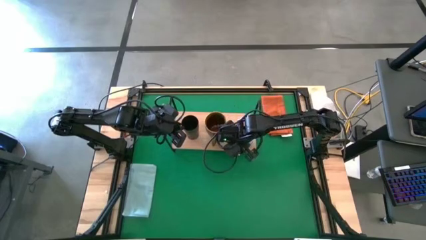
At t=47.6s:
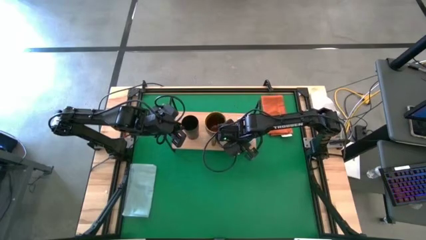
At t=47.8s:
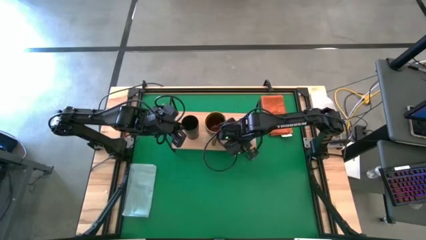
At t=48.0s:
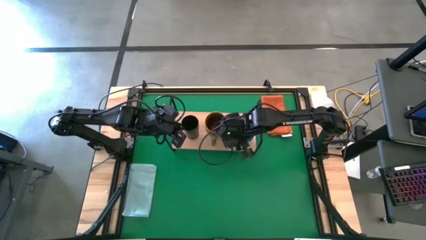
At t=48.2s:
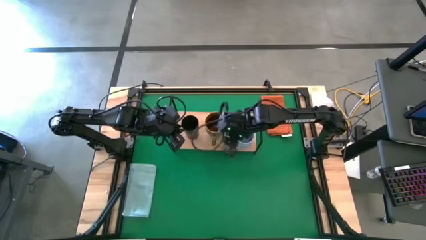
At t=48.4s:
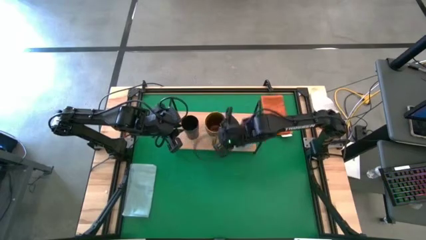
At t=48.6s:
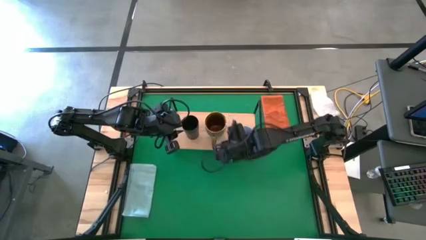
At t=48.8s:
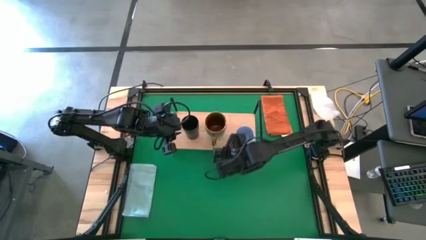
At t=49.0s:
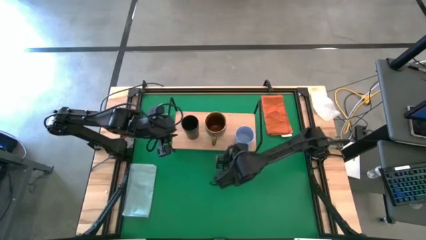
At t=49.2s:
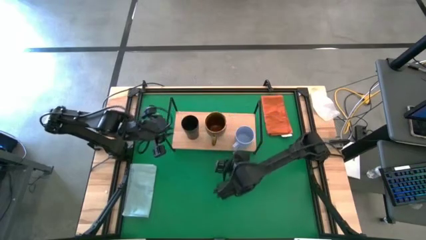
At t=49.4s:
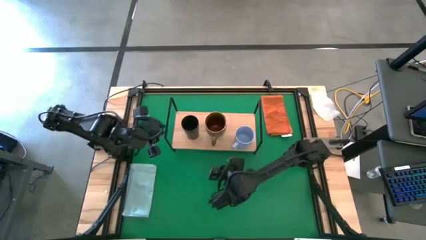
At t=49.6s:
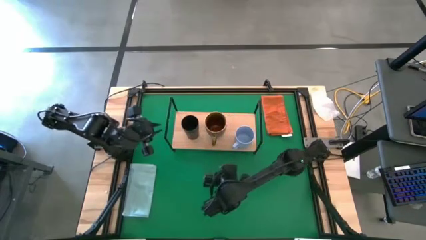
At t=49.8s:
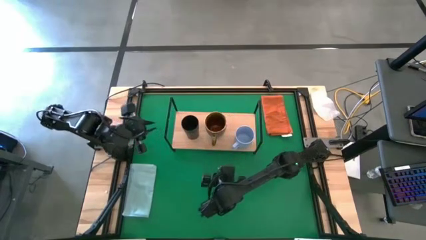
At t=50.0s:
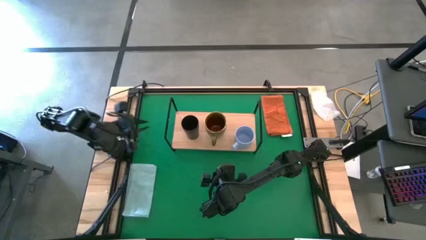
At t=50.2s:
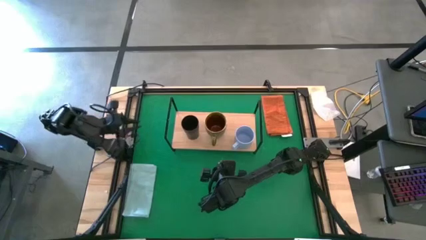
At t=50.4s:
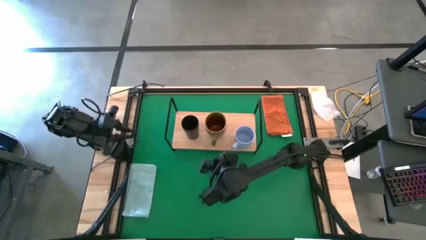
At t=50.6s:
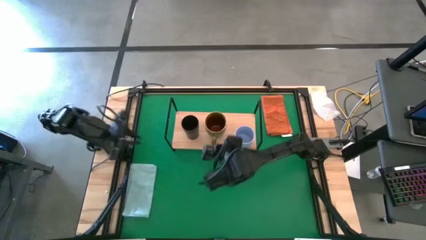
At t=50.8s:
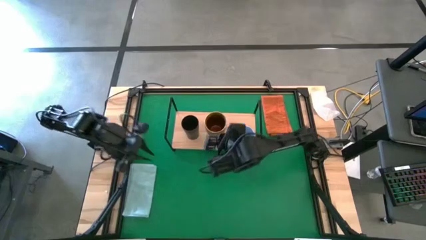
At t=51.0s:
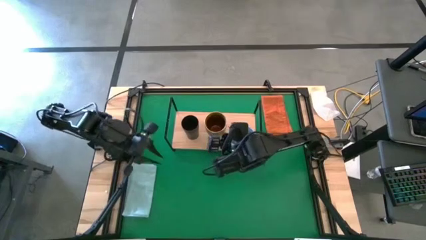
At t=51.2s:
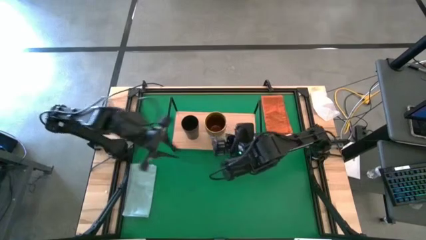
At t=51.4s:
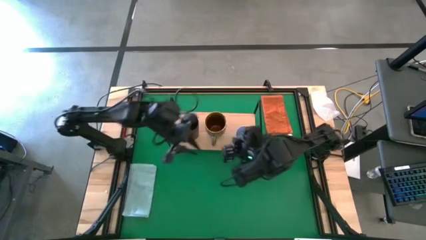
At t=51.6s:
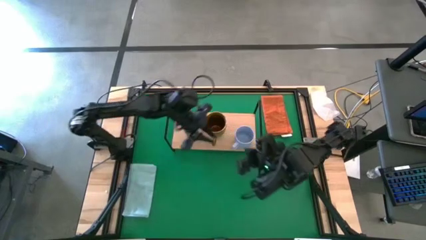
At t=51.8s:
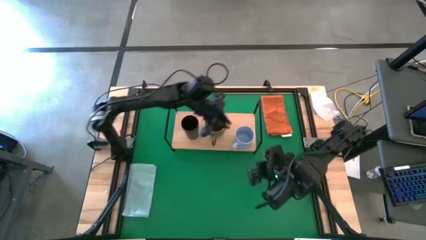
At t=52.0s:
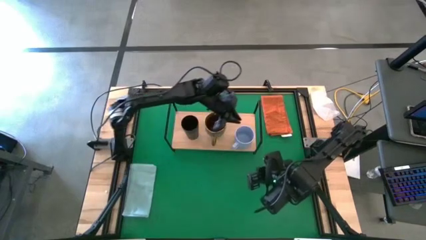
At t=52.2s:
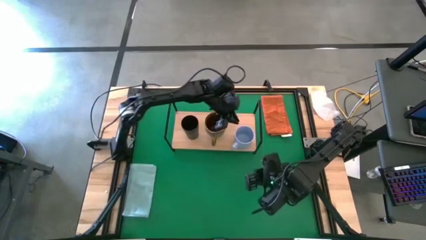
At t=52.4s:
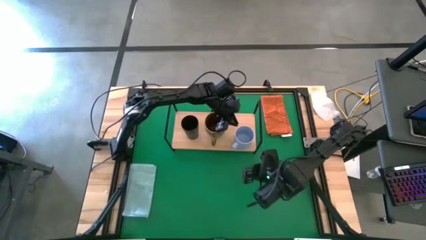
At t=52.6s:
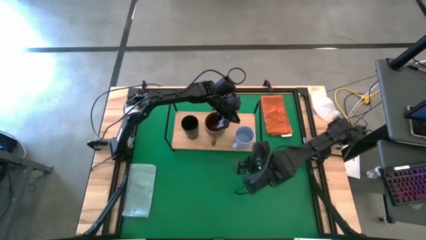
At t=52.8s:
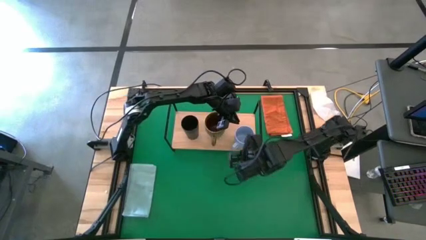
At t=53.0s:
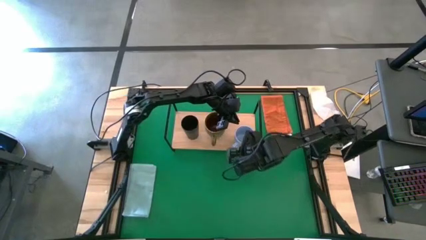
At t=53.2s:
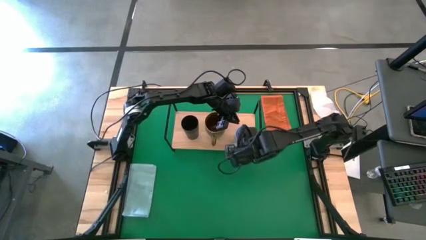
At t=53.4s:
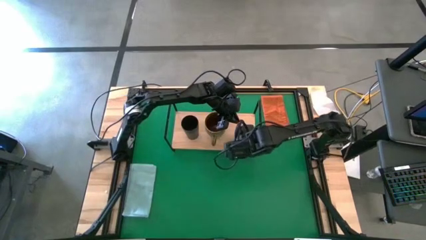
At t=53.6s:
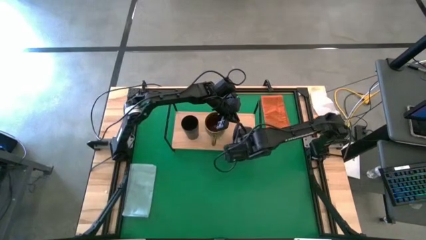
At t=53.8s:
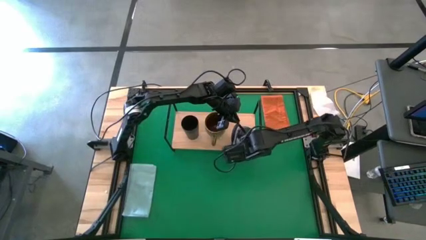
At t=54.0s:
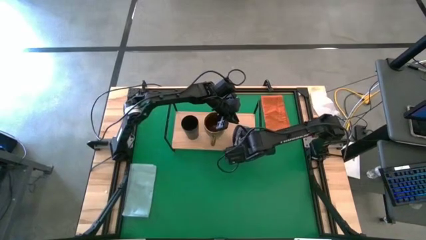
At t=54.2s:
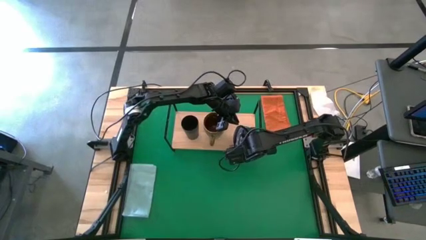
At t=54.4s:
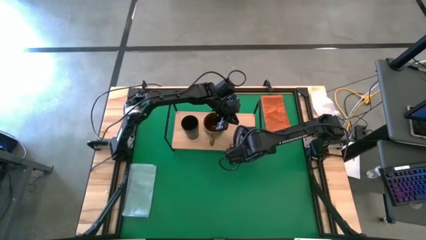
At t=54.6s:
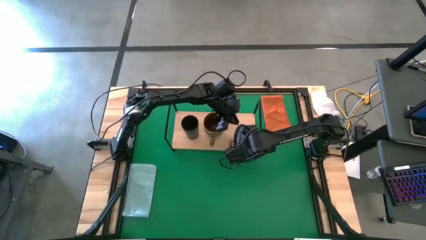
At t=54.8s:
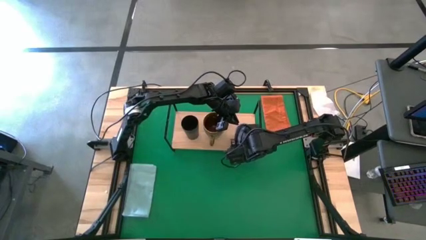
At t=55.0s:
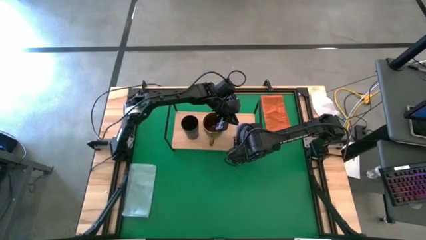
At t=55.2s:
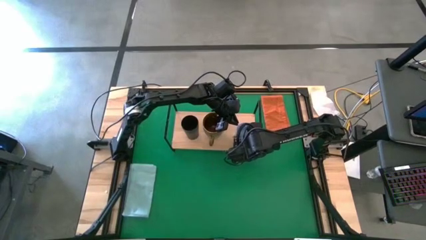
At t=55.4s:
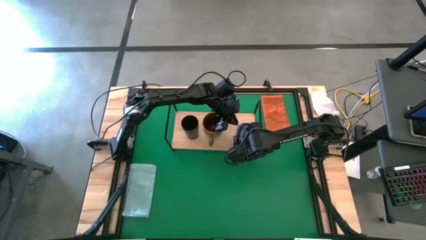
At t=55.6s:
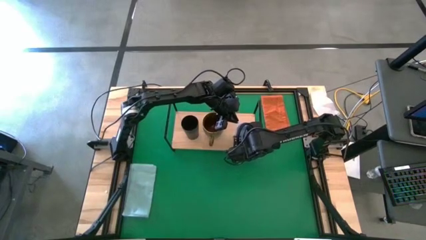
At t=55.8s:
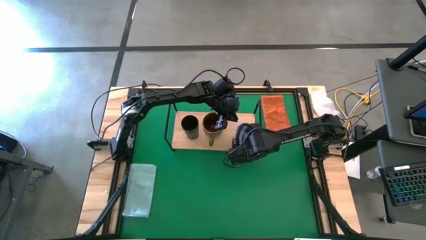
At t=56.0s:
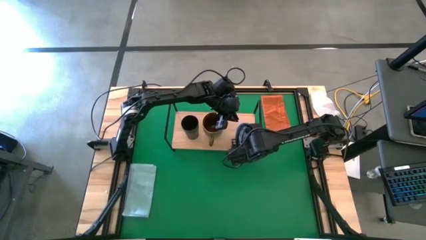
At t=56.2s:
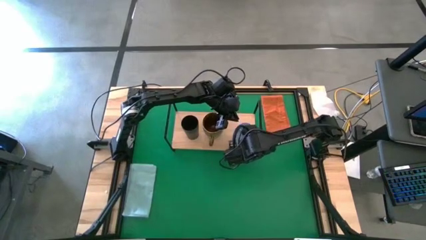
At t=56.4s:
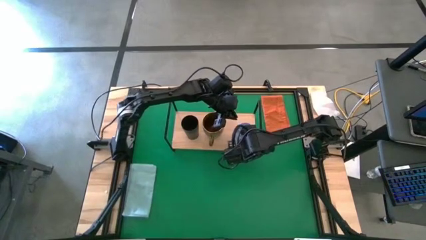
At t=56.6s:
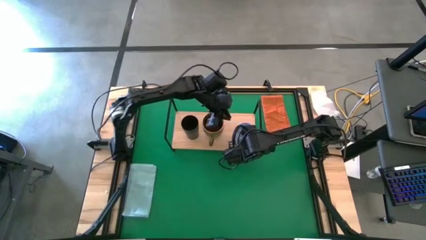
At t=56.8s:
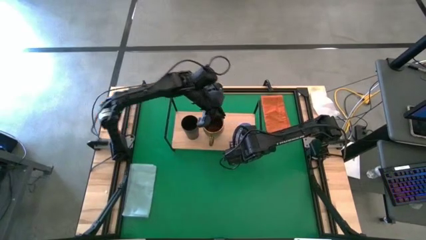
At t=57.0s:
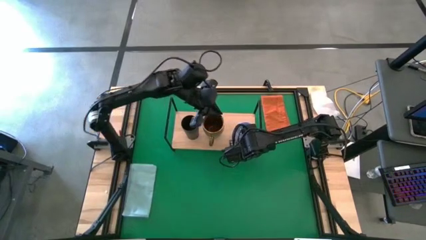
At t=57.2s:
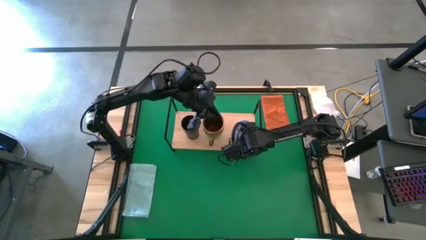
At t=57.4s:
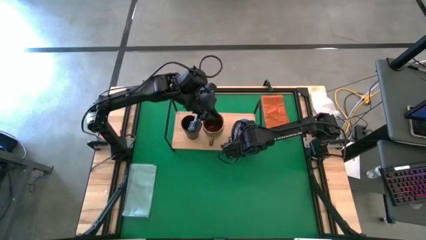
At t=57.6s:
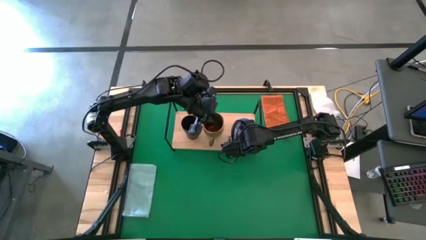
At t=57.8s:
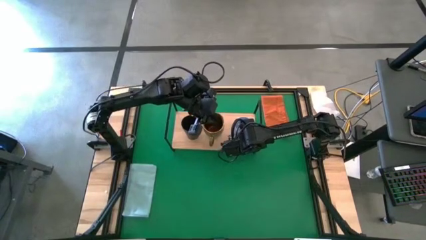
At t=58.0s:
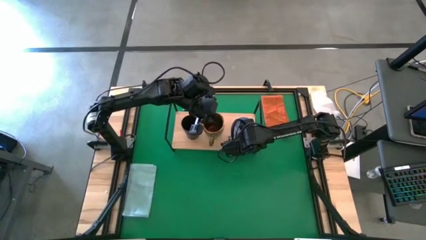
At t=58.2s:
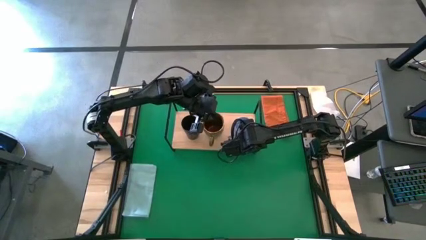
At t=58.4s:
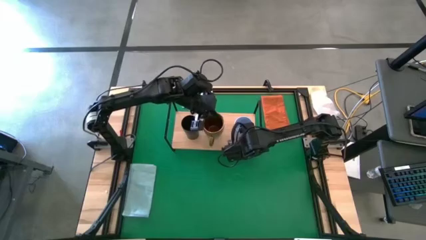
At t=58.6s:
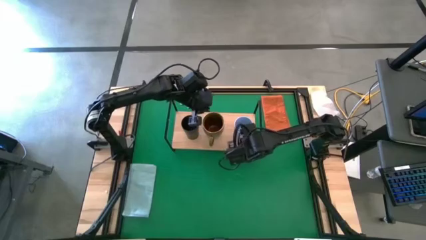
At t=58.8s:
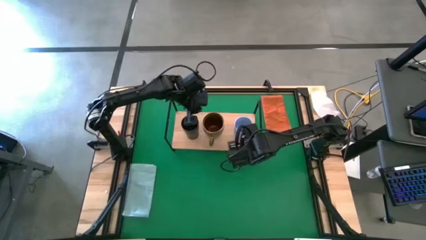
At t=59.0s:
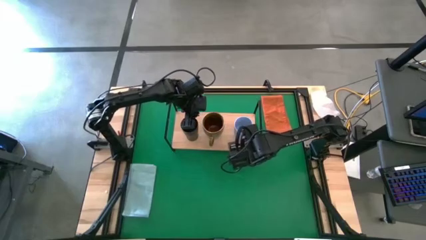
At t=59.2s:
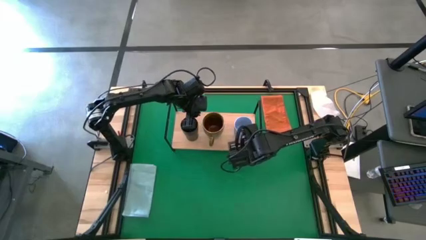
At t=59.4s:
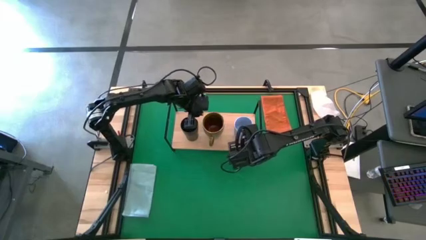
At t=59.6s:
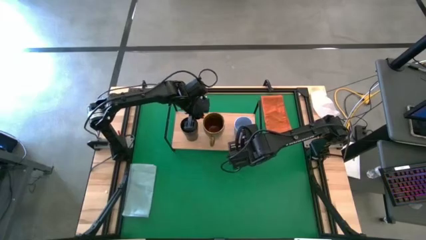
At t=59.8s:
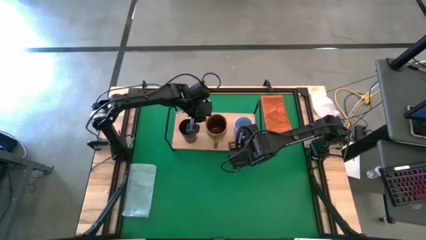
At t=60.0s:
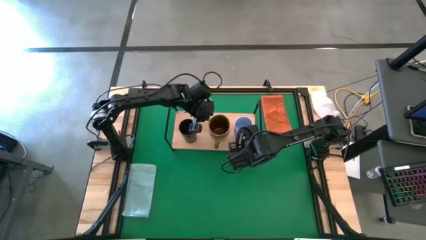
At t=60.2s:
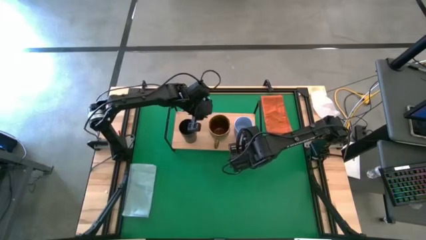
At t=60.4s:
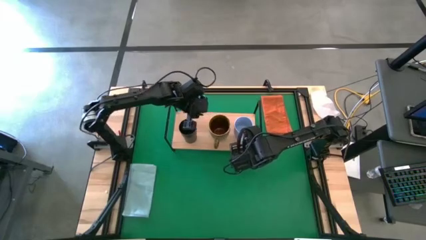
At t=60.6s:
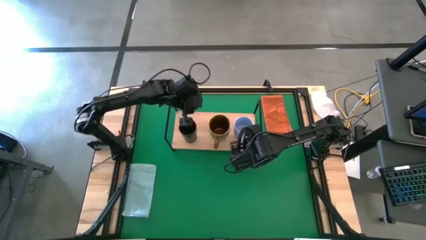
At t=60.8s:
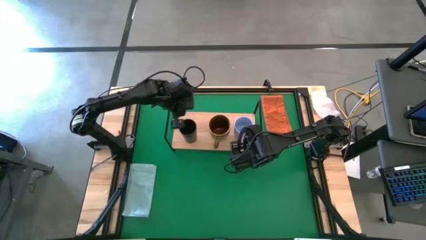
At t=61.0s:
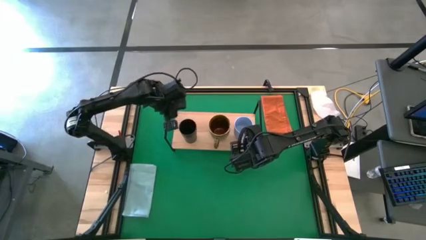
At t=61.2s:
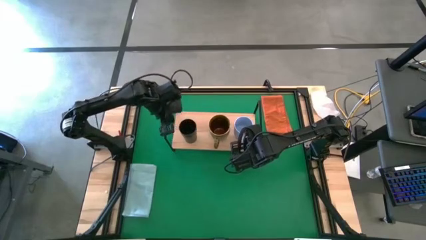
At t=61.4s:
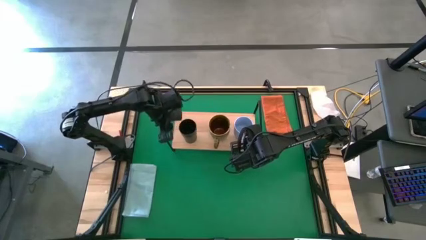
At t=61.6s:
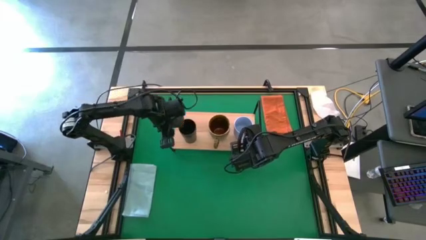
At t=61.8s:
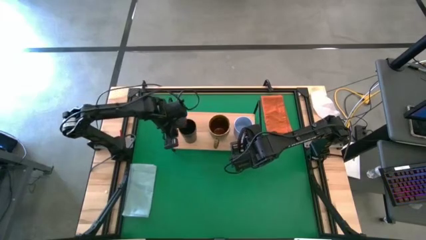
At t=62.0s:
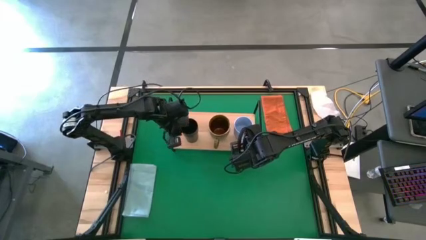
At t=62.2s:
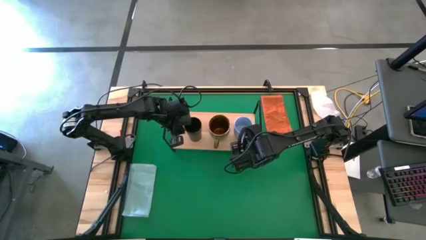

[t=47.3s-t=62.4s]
Task: Stack small to large cups/mugs on shelf
Adjust the mugs including the cup

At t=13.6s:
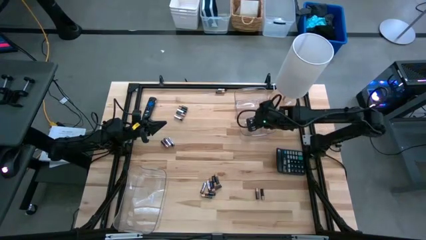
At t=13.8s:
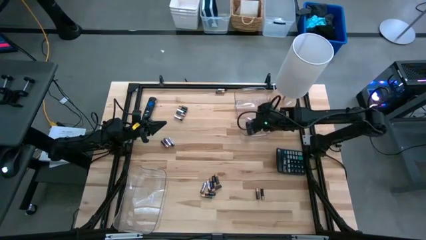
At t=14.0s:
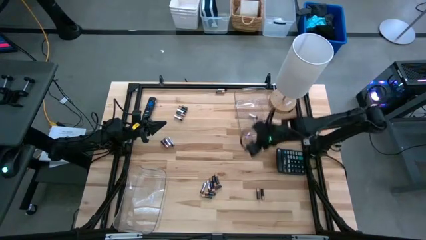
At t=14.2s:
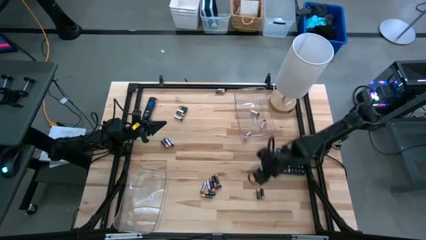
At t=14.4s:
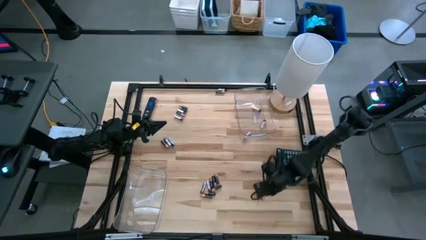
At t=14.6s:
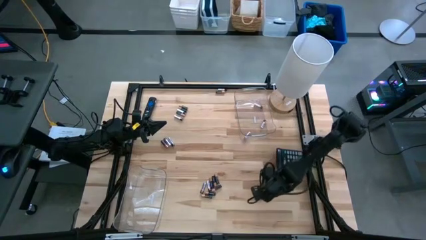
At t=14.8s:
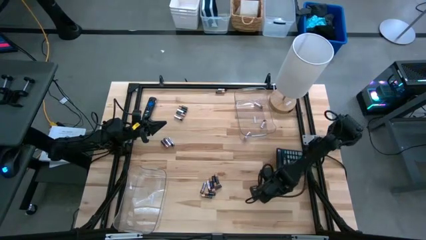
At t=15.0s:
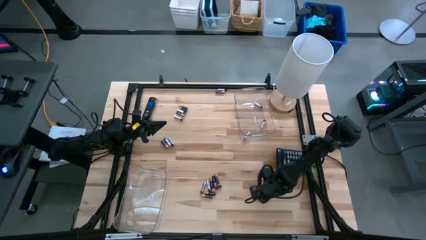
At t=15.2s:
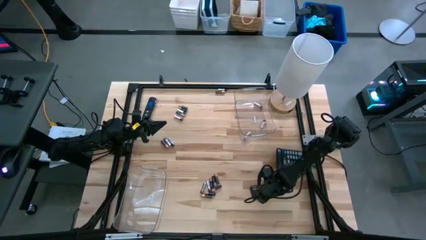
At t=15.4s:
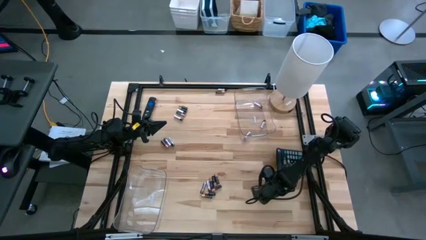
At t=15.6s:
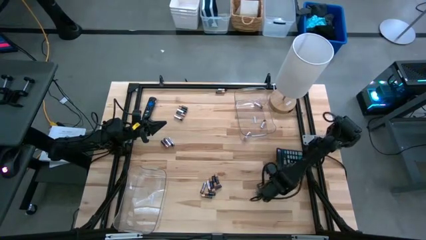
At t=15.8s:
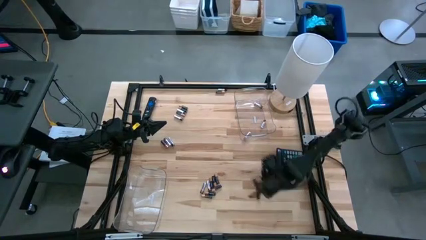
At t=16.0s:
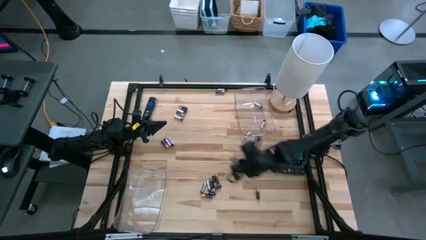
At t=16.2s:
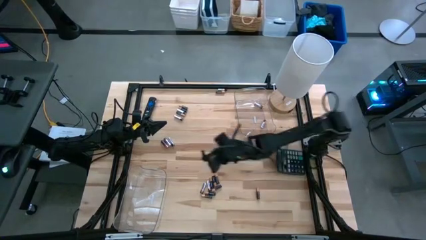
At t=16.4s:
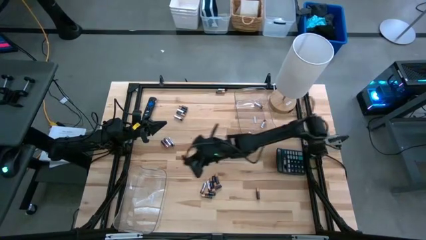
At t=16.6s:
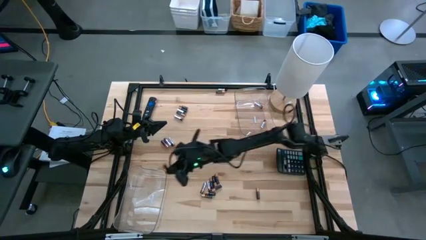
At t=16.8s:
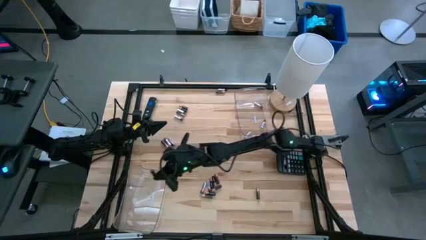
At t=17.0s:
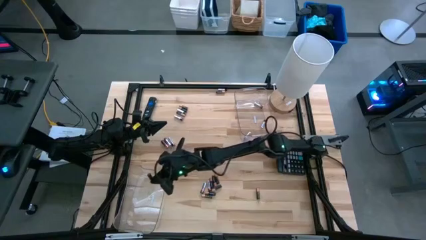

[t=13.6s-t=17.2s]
Task: Sort batteries
Put the brown battery into the left transparent bin
